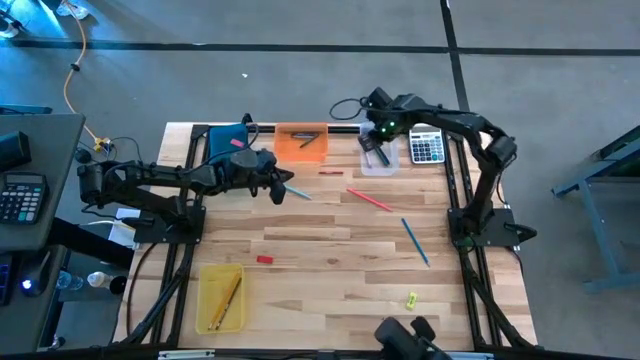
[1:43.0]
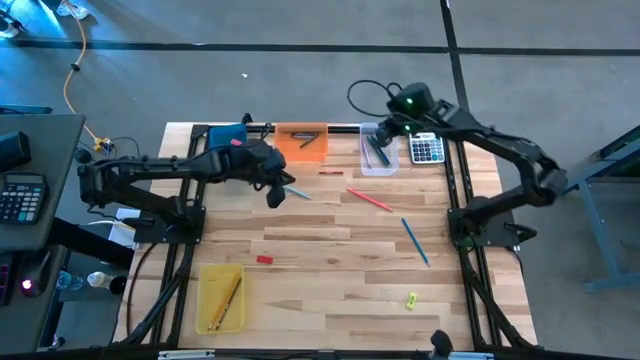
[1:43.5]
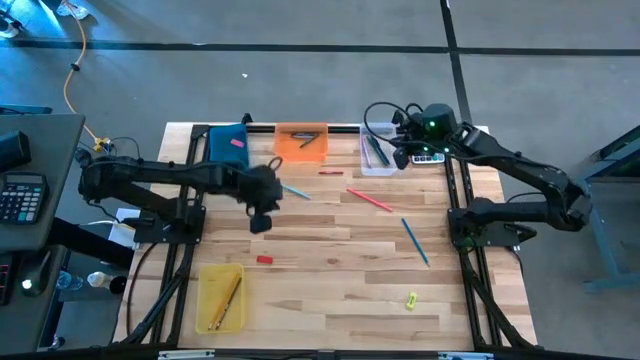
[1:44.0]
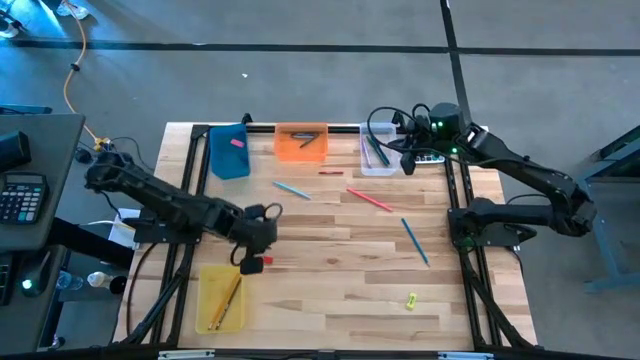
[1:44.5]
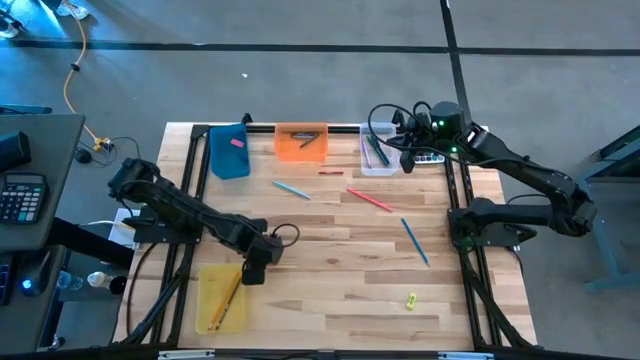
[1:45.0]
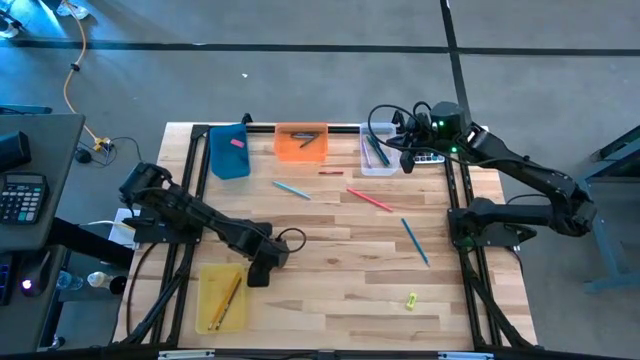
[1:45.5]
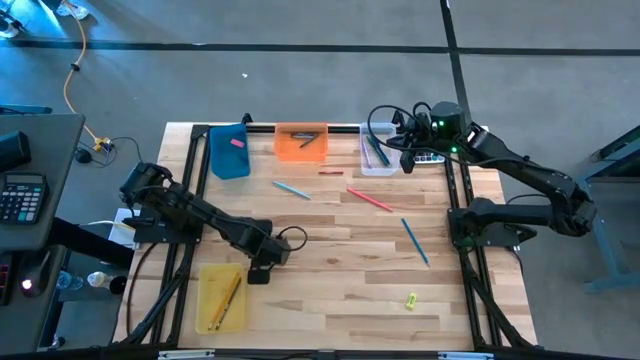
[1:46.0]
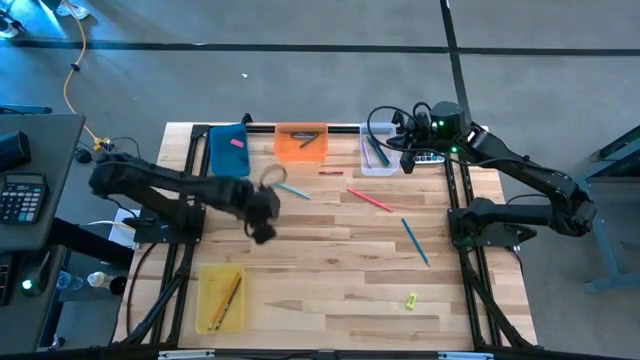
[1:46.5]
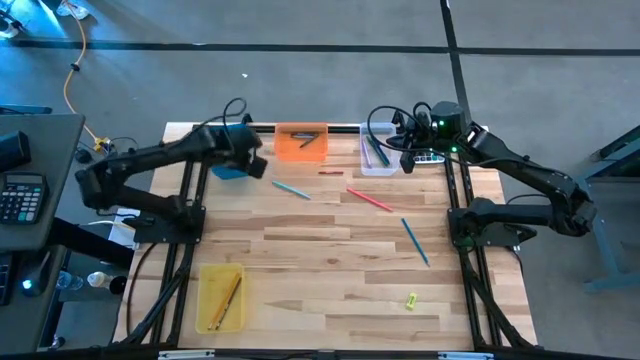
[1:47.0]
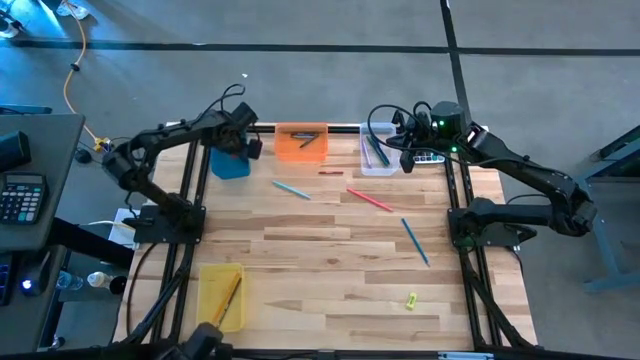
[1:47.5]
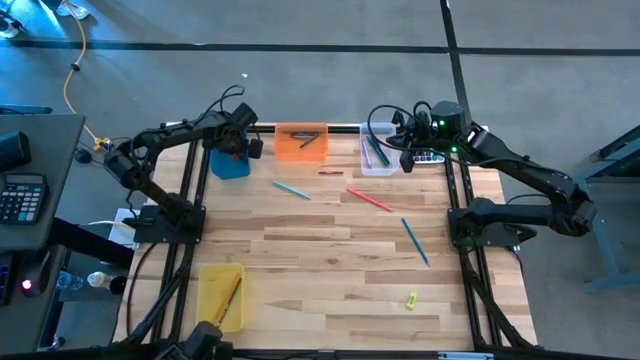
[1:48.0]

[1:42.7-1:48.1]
Task: Sort crayons/erasers/pens/pencils in bins
Put the red eraser into the blue bin

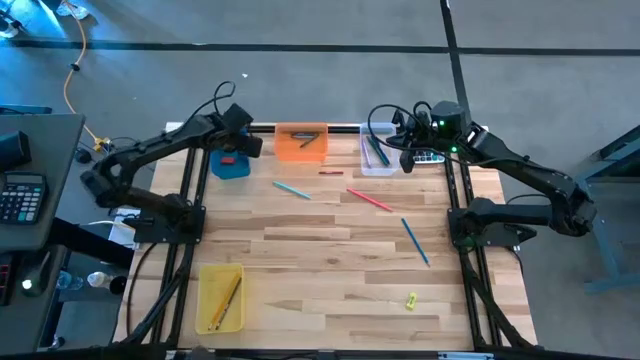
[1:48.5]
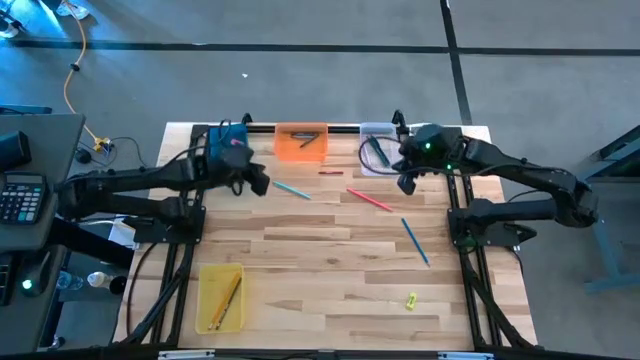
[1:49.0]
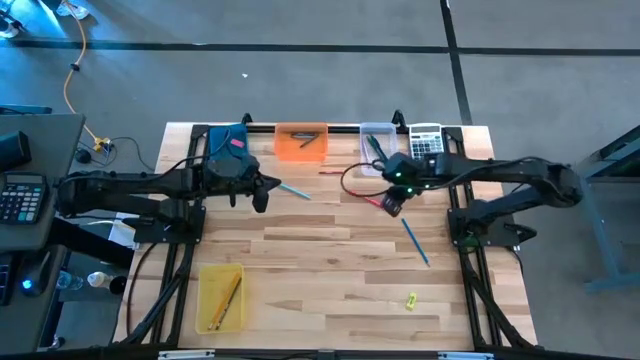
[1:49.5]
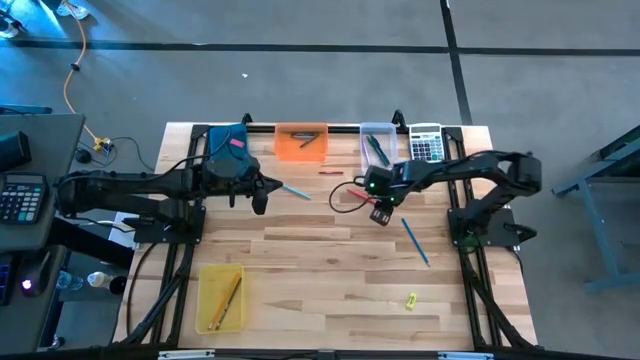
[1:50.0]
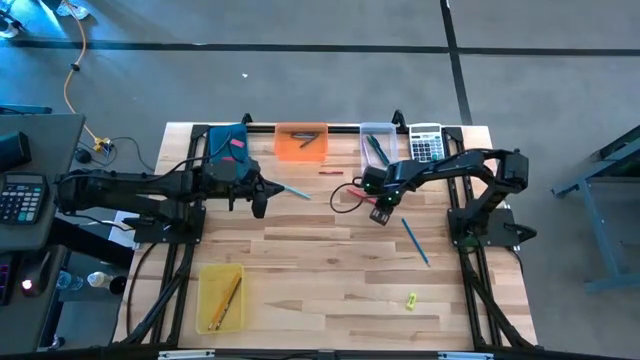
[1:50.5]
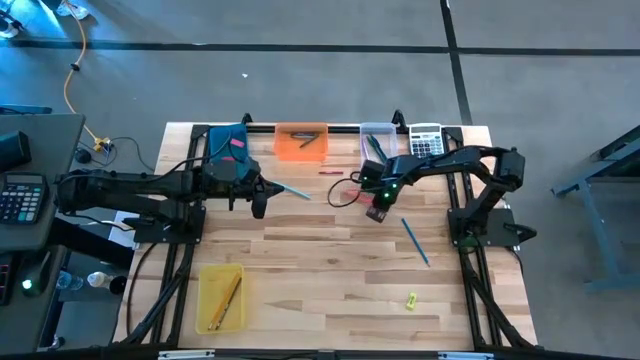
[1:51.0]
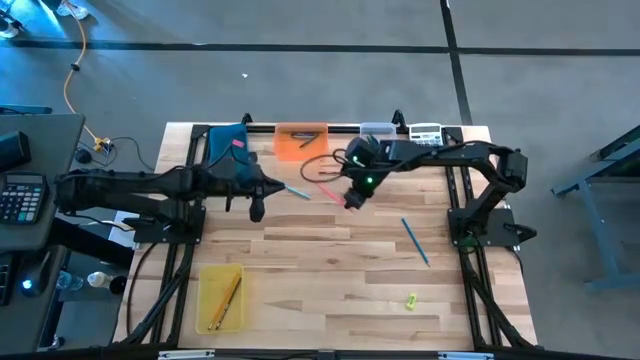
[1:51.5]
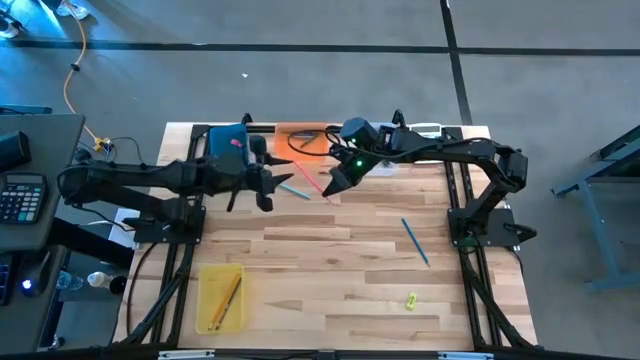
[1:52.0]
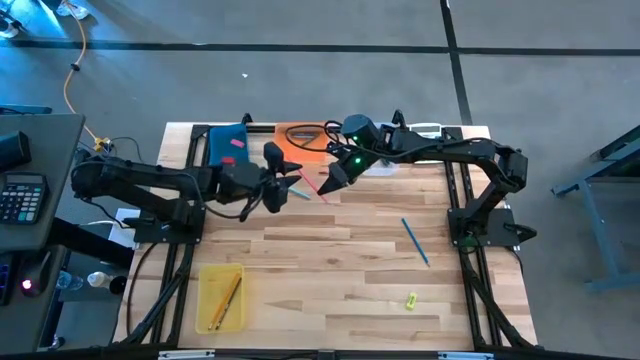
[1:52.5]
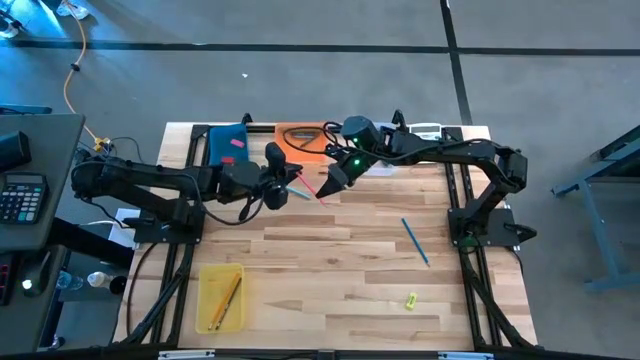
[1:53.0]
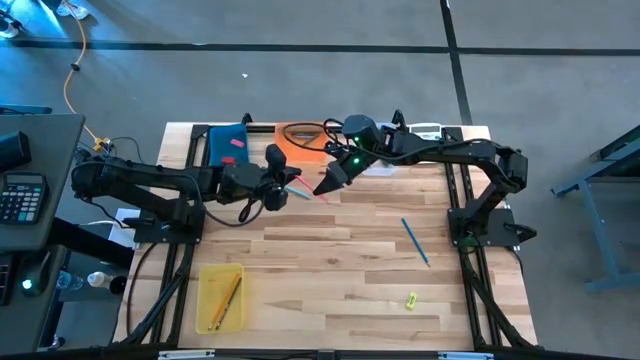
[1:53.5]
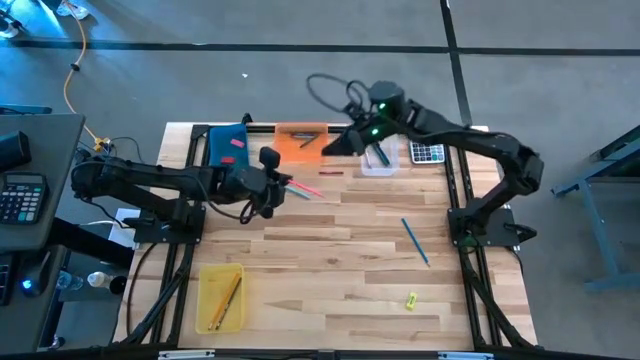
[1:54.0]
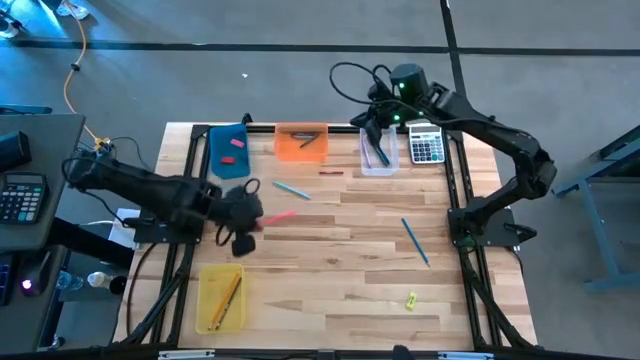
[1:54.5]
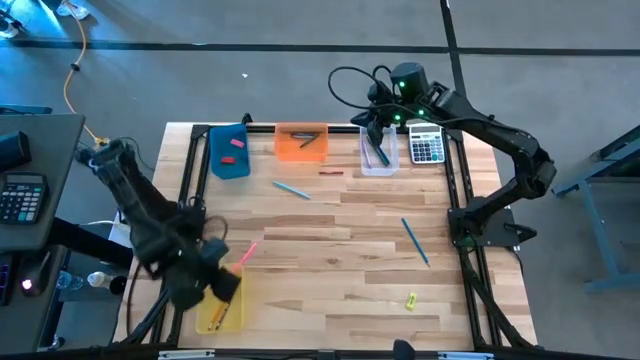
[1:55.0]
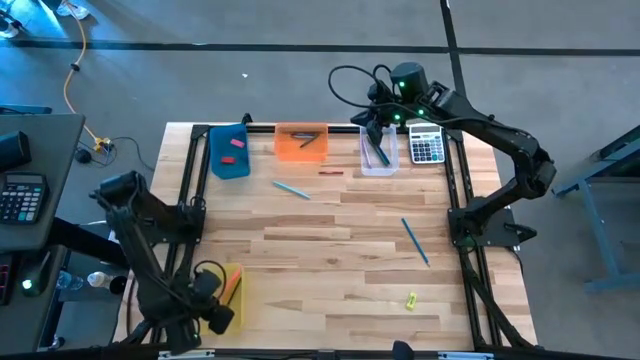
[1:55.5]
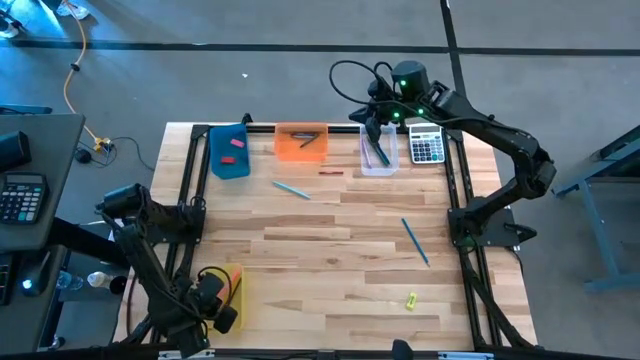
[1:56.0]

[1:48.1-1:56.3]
Put the pink pencil into the yellow bin

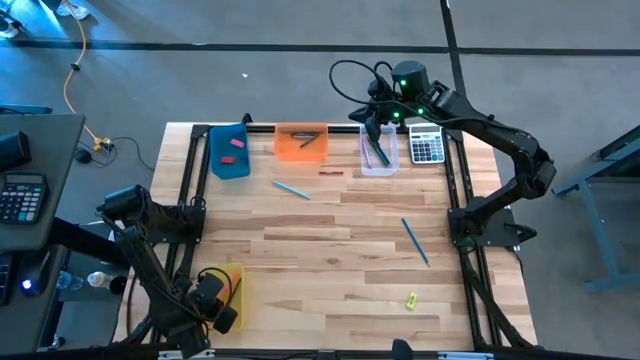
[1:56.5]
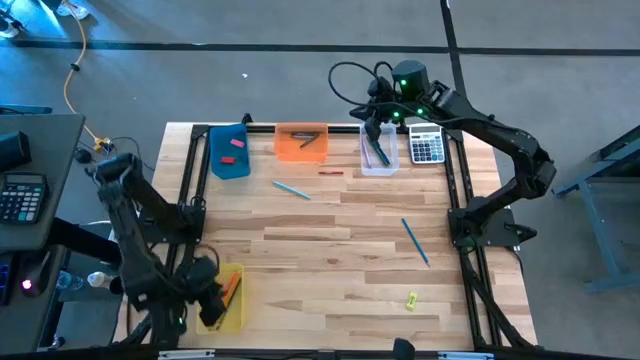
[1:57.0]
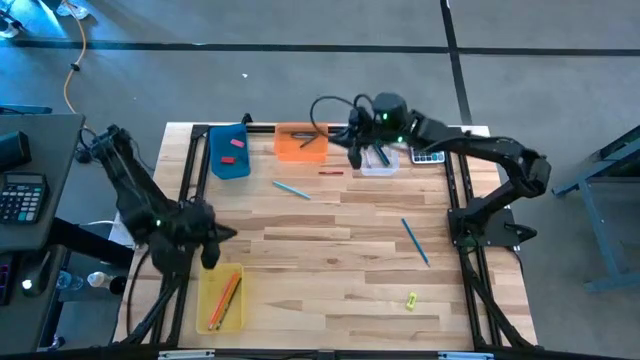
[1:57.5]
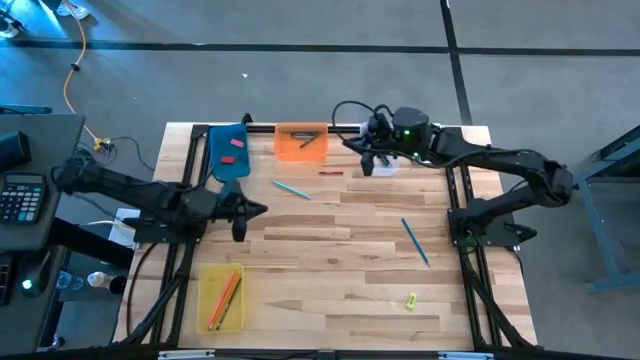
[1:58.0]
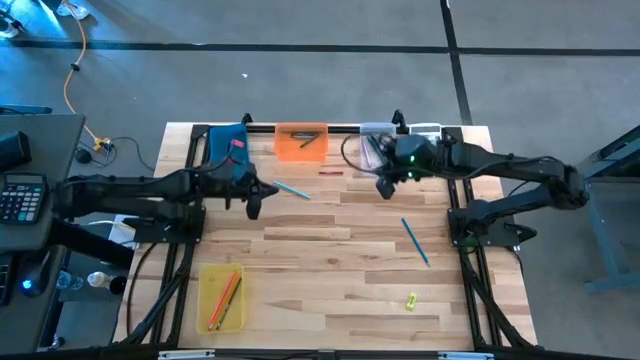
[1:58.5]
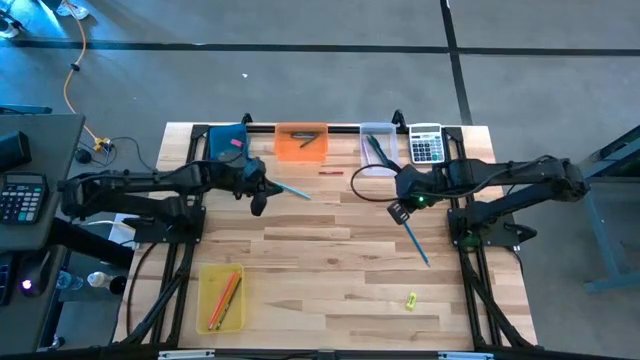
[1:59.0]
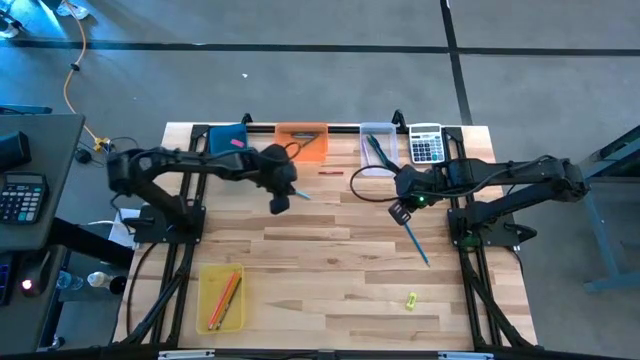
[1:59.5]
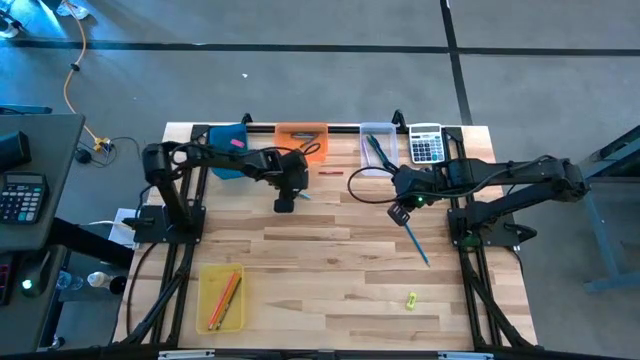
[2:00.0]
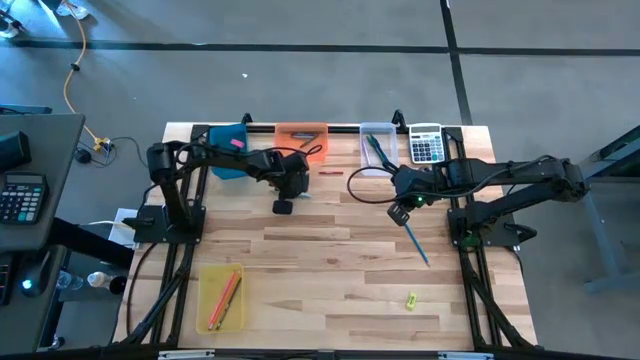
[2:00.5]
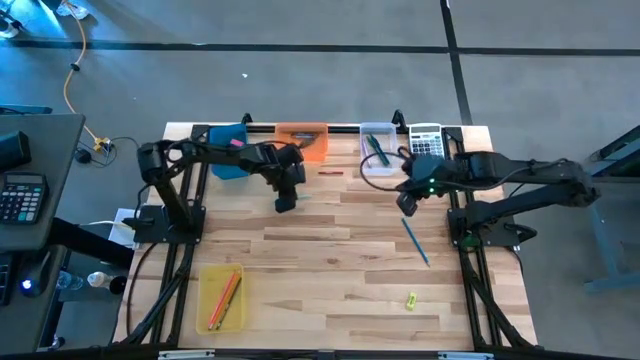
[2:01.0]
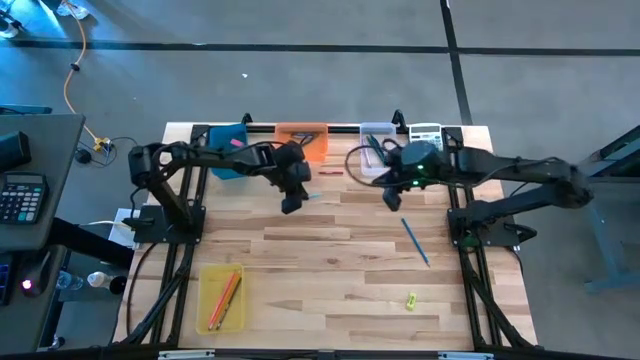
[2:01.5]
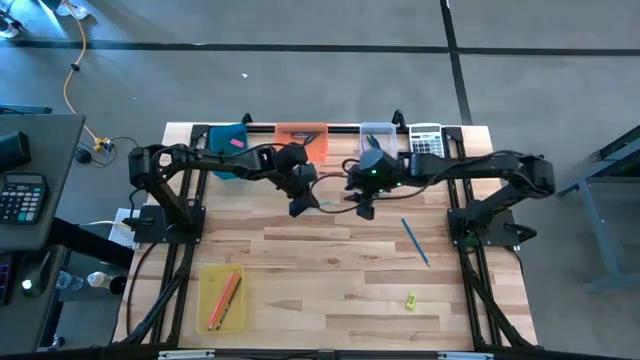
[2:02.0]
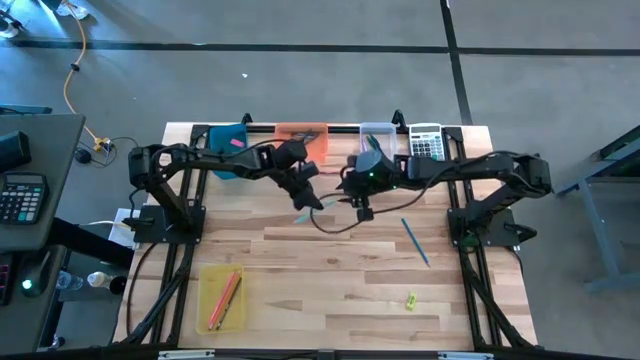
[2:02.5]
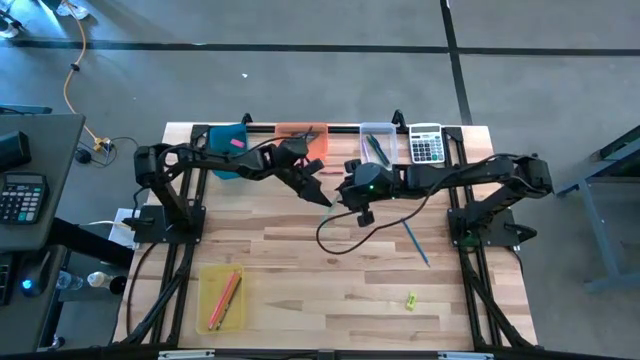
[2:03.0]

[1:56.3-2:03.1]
Put the light blue pen into the transparent bin

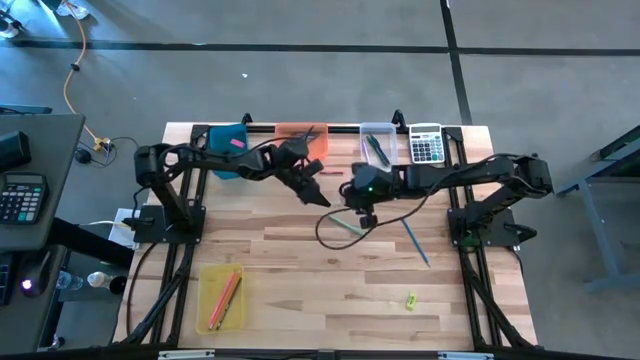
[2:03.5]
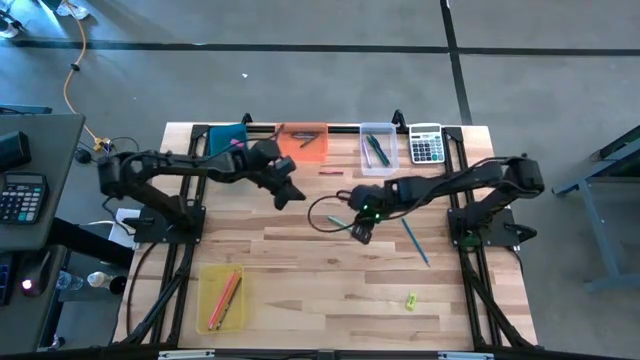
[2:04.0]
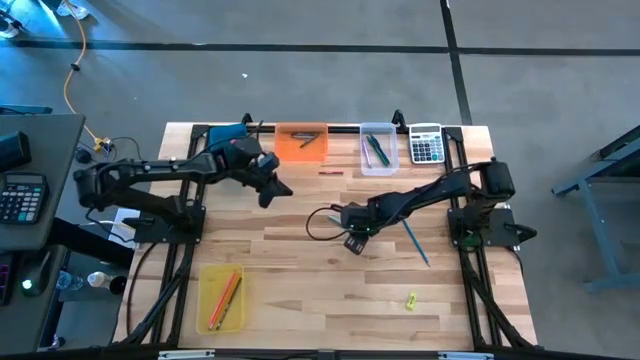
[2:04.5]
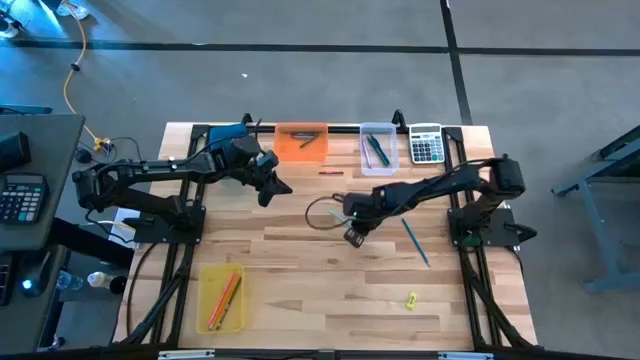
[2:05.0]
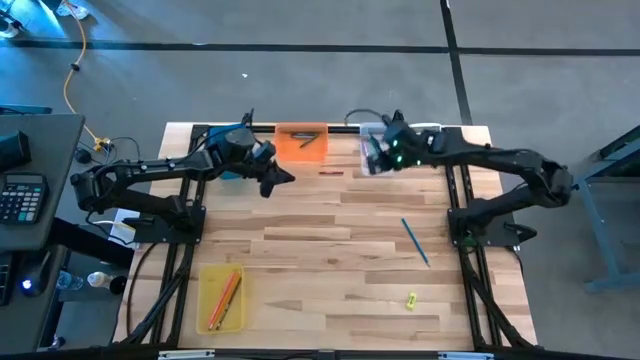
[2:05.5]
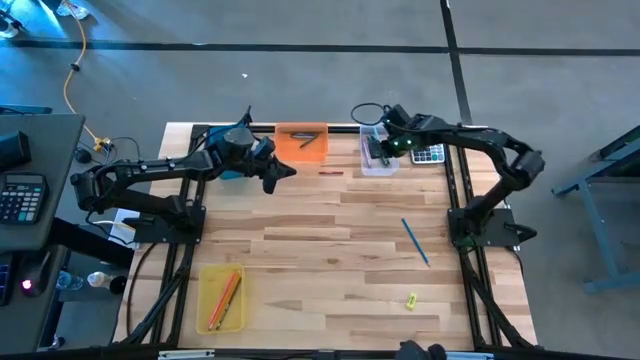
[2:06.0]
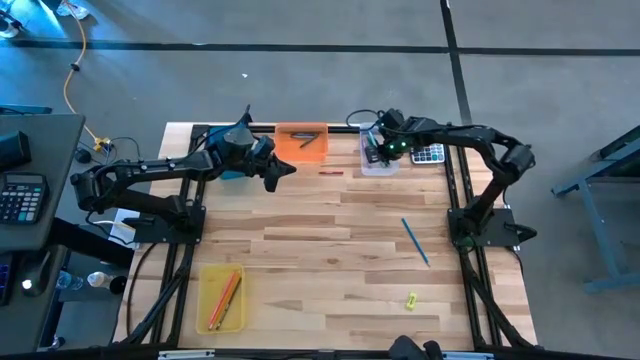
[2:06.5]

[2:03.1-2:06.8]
Put the light blue pen into the transparent bin
